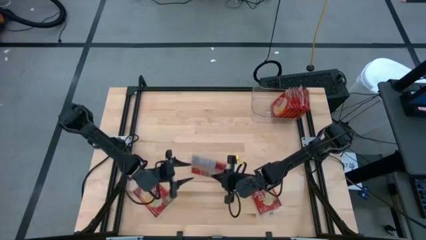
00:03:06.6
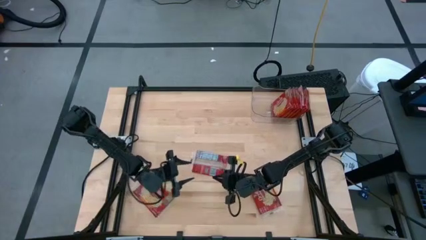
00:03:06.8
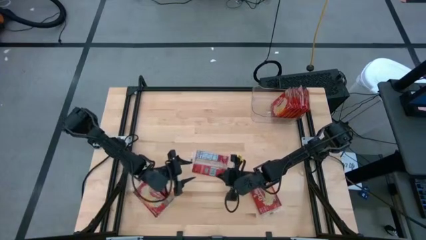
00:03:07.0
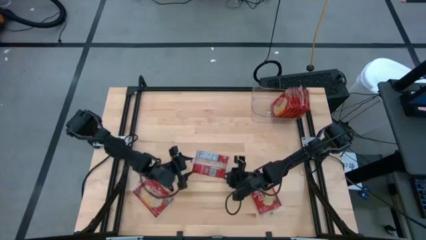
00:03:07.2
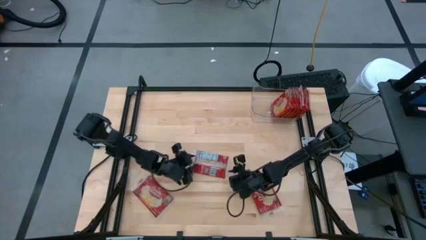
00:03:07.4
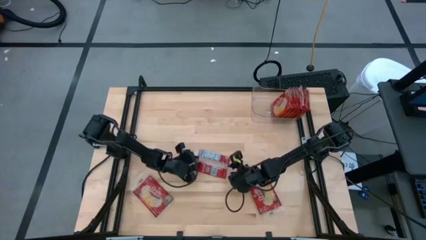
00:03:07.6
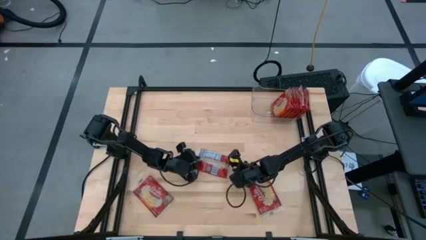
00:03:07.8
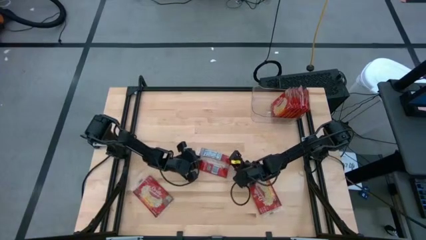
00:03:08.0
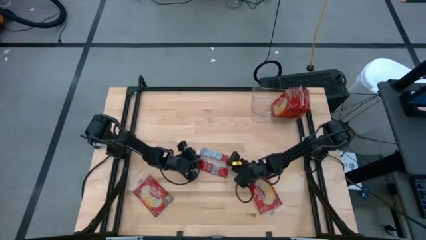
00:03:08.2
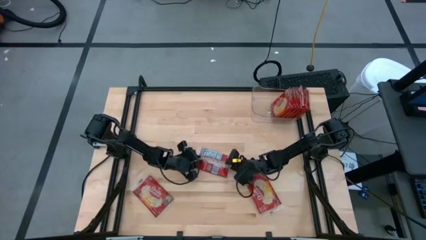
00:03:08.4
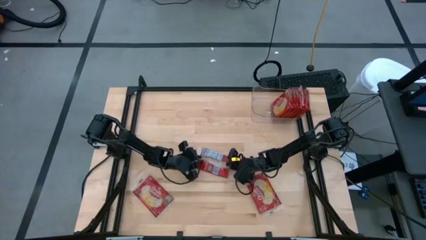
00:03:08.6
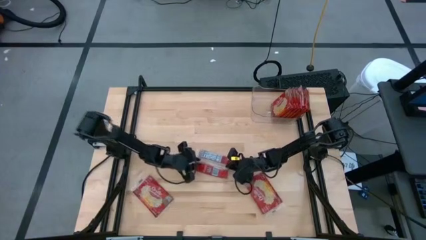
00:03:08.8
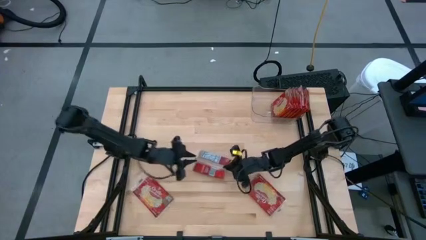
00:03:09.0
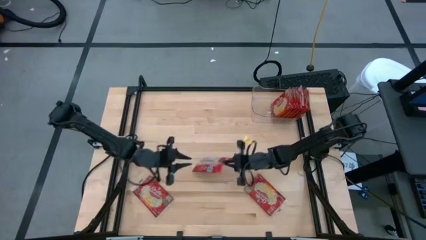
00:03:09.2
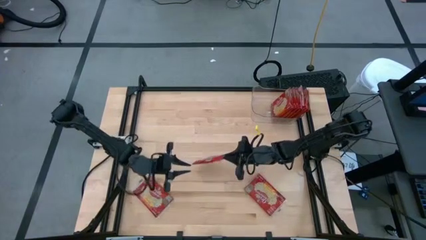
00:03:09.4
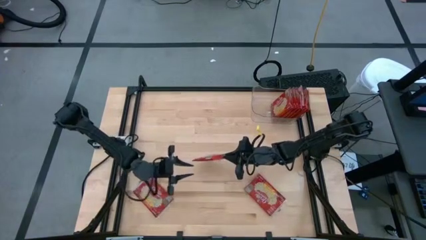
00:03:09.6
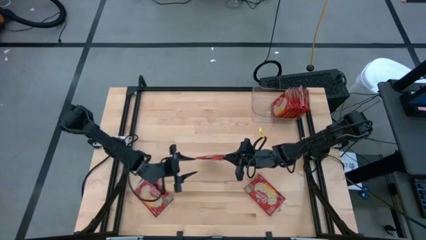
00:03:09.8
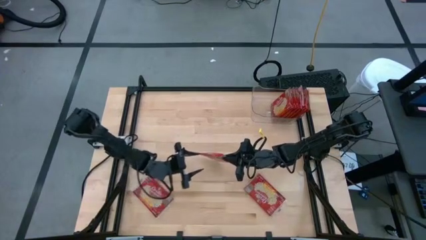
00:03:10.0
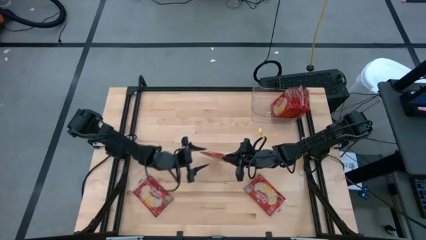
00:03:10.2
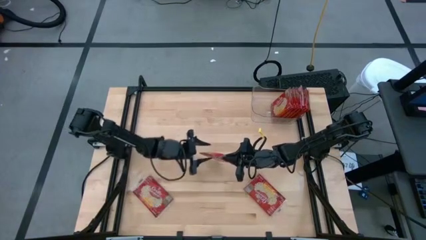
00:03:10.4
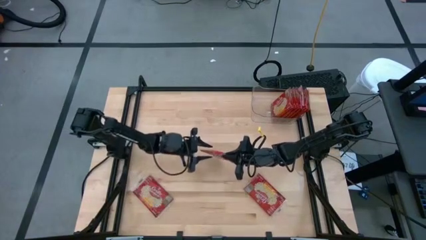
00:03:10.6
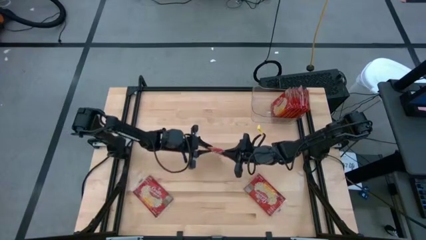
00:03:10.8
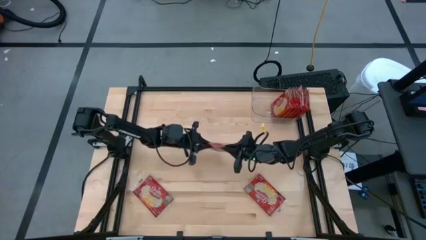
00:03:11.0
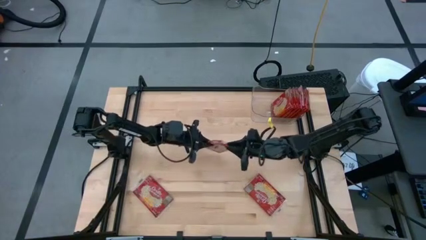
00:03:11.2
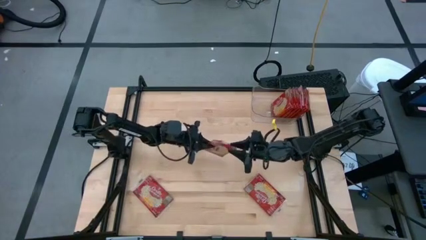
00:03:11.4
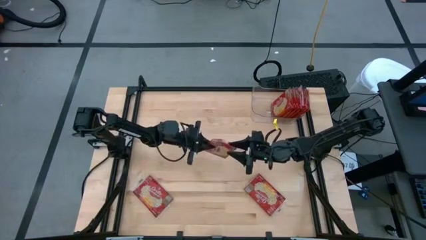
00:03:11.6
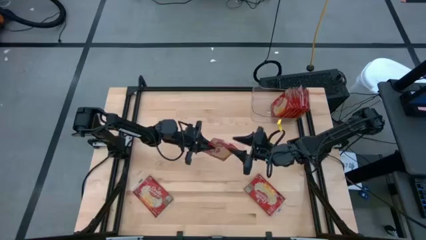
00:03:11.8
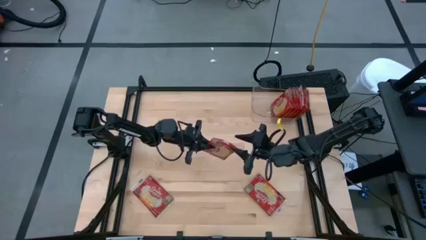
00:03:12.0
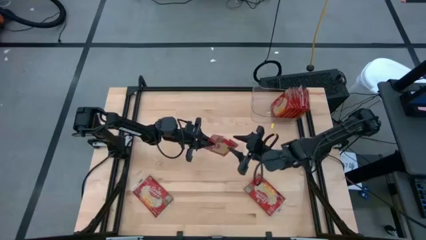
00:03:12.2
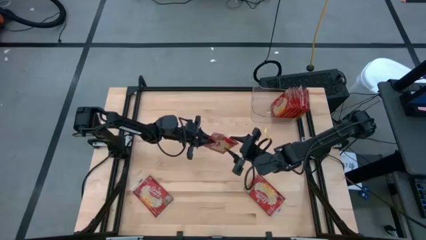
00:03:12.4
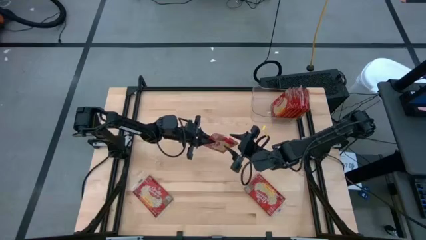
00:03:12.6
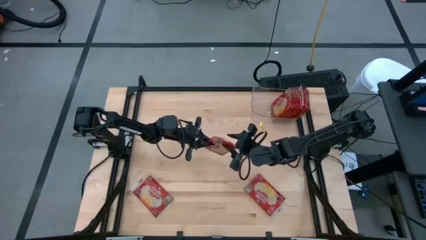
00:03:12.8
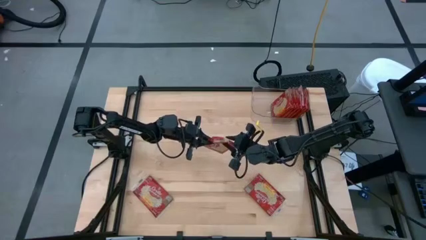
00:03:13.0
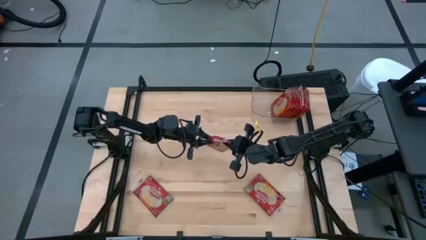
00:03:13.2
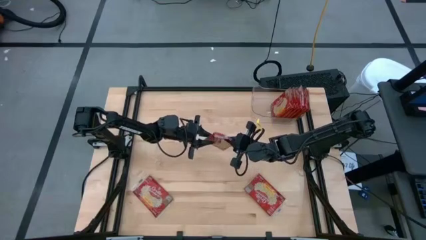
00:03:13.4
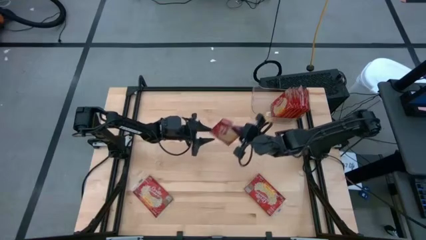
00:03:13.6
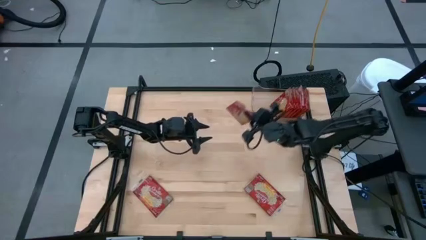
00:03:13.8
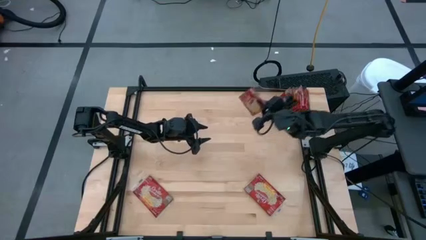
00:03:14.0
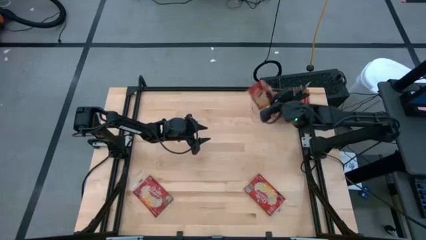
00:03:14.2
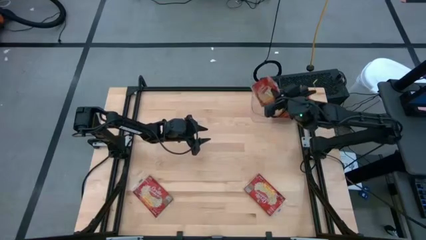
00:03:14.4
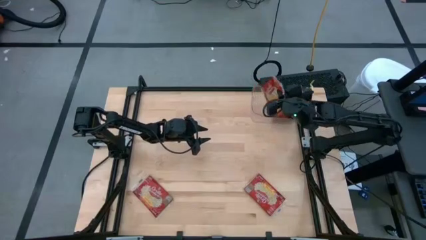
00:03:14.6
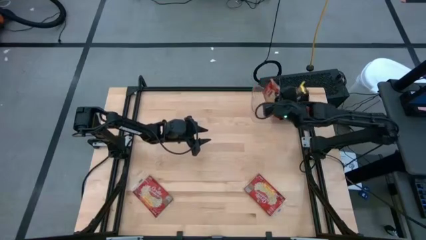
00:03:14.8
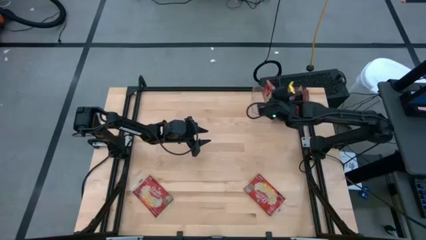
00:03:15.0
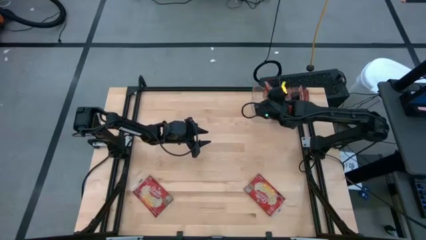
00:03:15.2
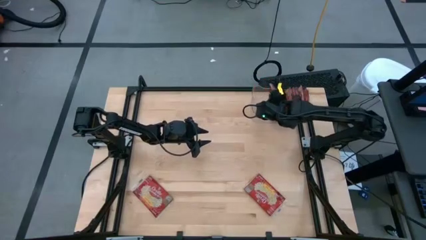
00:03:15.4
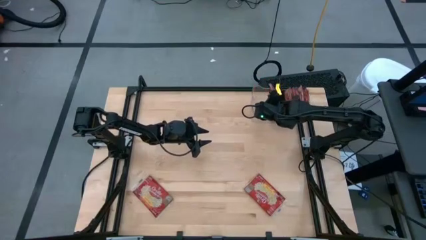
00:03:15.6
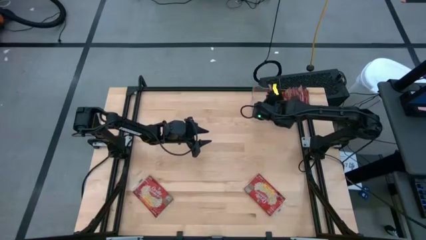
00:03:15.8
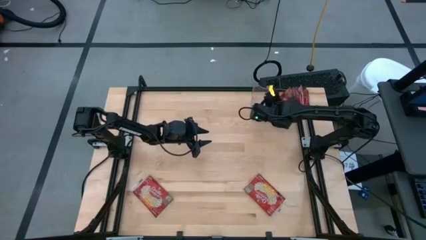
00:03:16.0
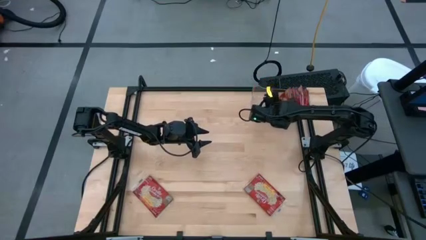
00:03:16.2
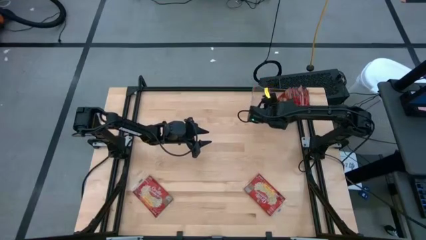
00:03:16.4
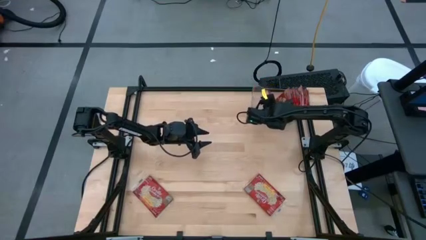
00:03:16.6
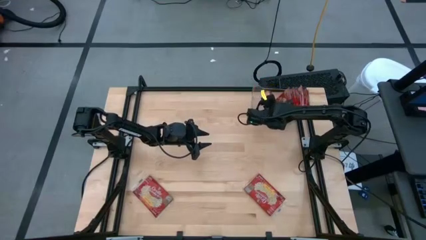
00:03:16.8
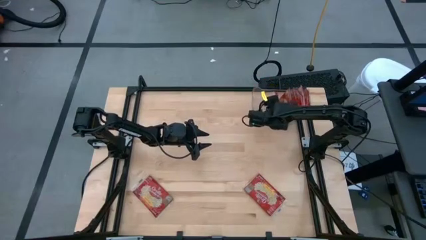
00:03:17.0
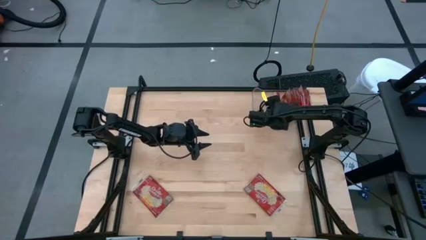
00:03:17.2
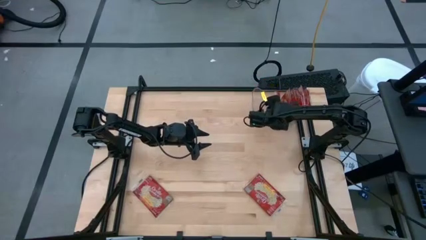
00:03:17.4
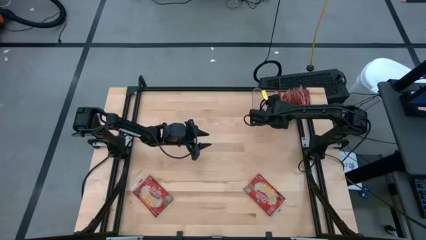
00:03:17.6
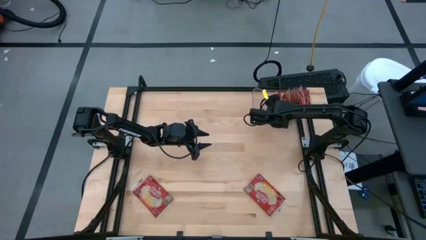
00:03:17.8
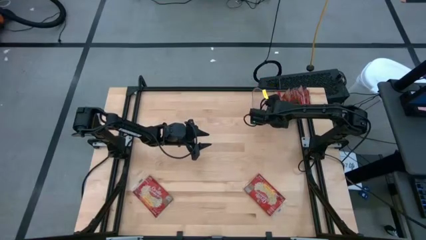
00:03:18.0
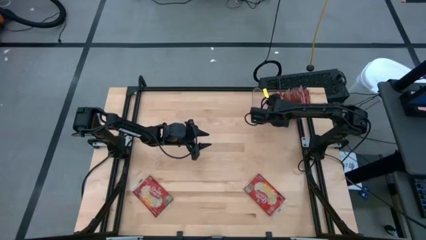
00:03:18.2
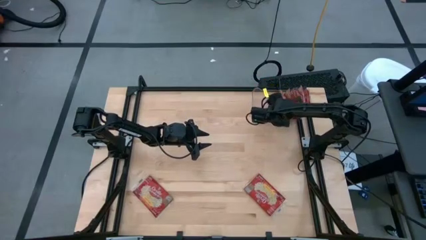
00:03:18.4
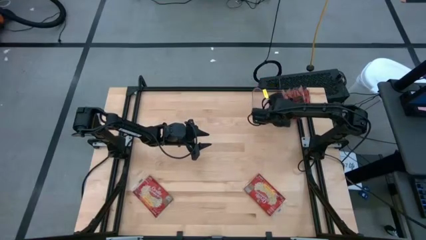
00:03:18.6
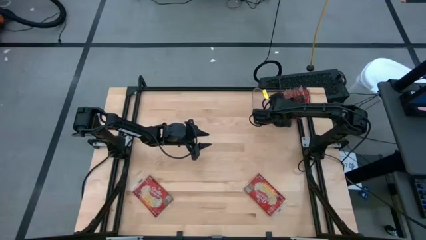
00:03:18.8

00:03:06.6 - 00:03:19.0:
Task: Sort popcorn bags into baskets
Put the red popcorn bag into the transparent bin

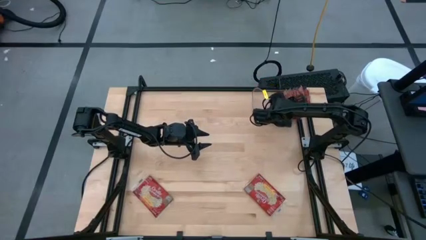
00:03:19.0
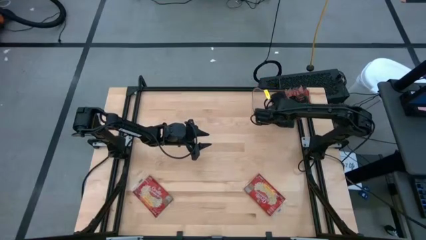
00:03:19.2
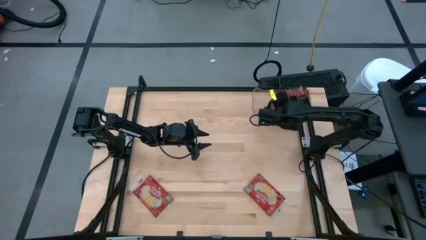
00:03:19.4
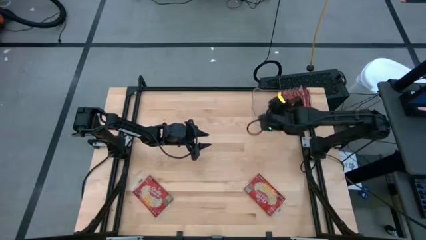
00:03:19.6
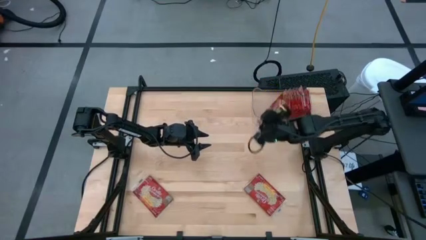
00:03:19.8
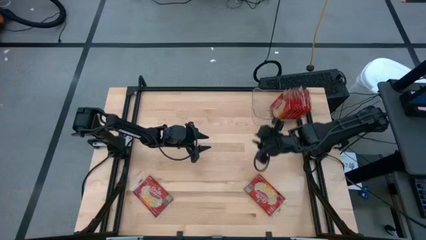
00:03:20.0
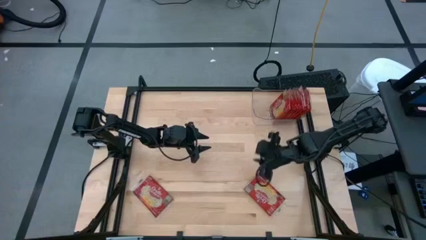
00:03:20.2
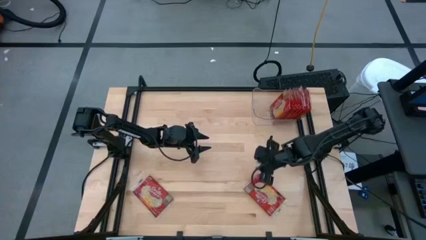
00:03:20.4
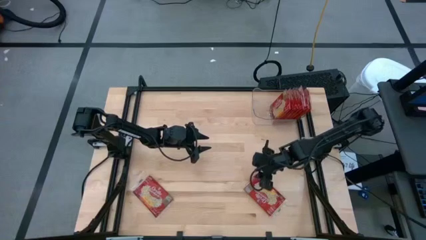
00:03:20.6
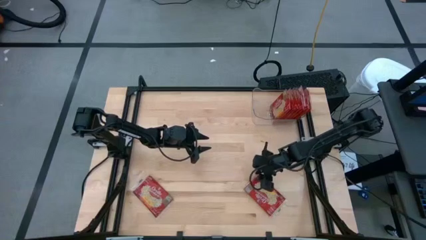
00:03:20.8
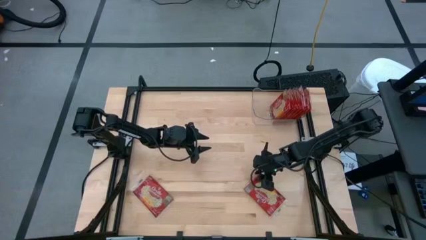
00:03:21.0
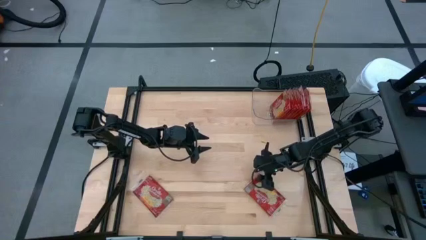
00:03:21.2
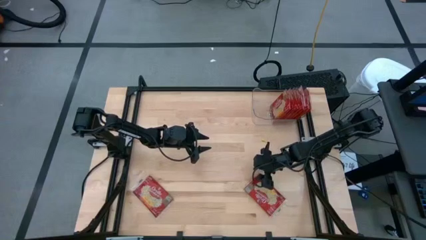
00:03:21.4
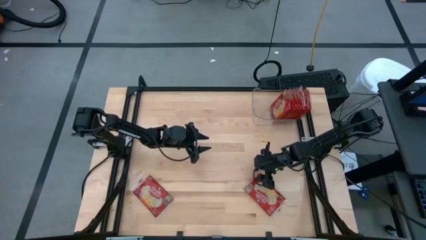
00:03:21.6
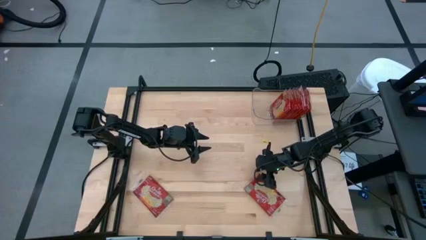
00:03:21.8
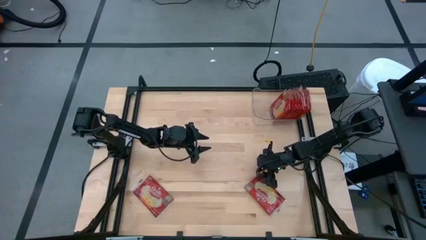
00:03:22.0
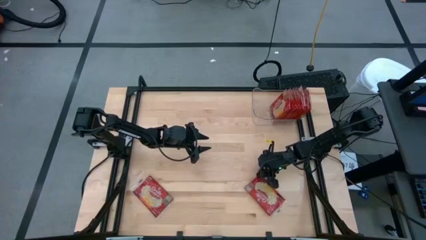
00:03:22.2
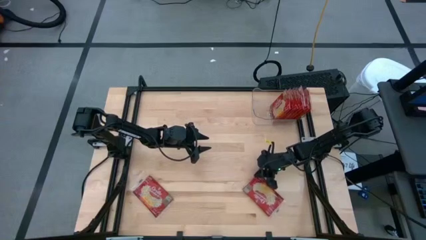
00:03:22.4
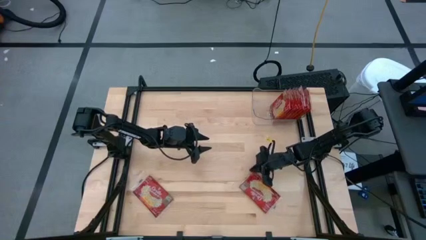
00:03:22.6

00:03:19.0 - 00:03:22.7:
Put the red popcorn bag into the transparent bin

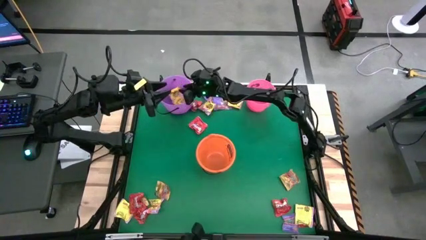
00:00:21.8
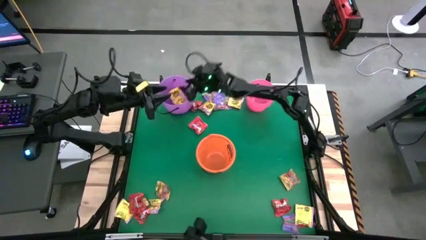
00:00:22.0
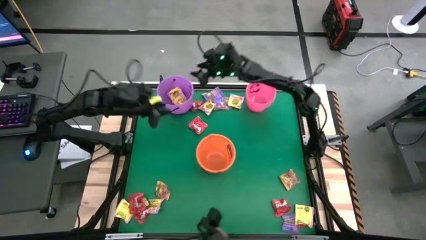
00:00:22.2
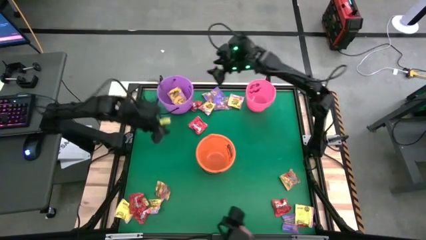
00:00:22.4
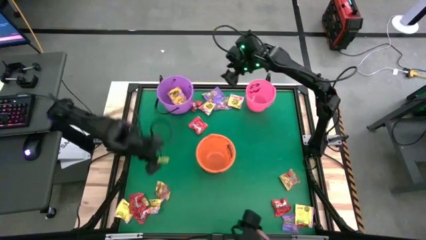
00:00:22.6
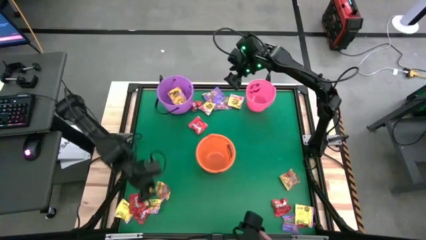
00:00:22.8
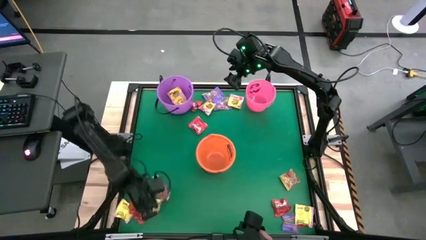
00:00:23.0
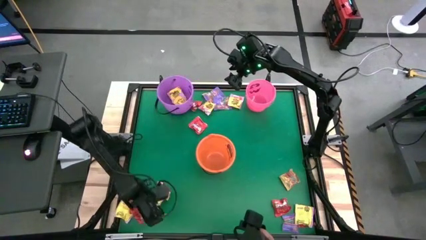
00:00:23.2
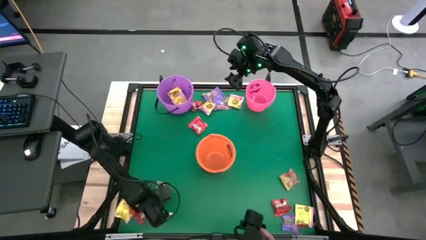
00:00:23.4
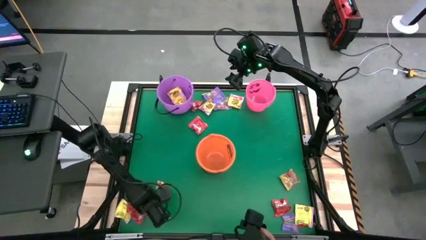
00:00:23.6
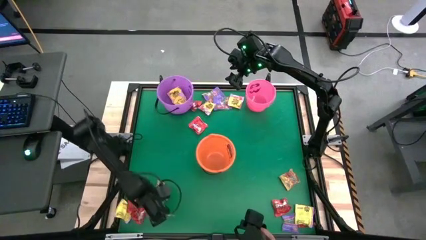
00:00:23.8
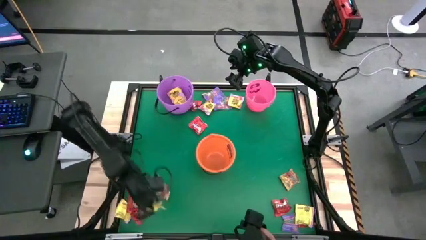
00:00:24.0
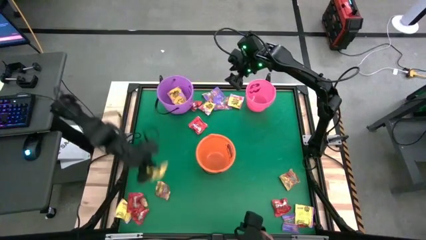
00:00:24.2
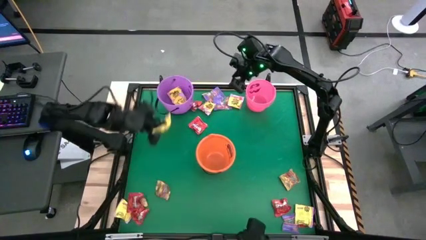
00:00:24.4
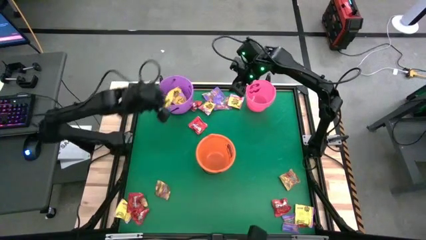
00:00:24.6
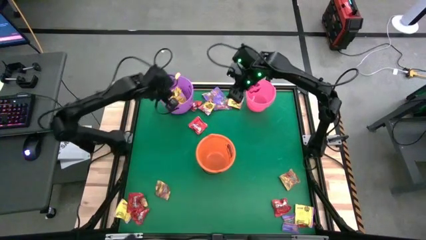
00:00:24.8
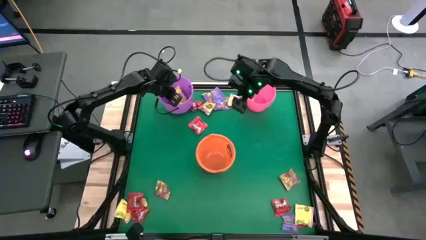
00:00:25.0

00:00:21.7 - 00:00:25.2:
Task: Sort candy by brand, put in halloween buckets
Put the yellow candy into the light violet bucket
